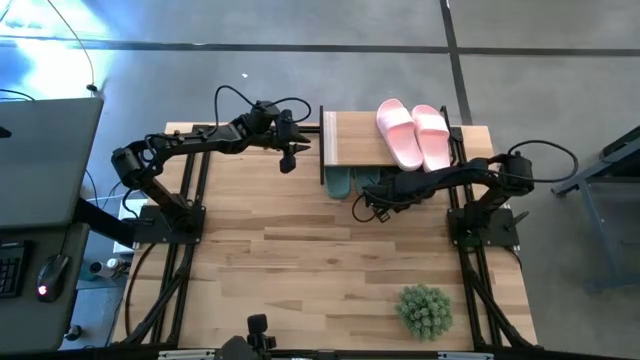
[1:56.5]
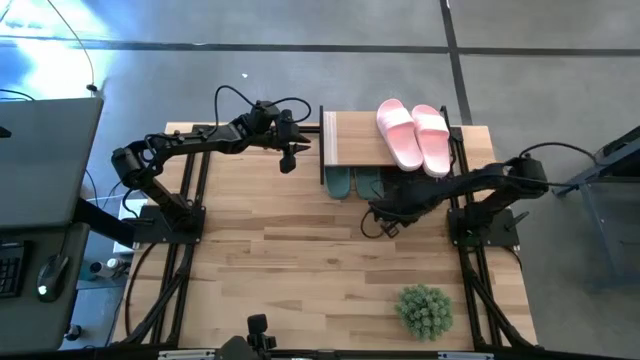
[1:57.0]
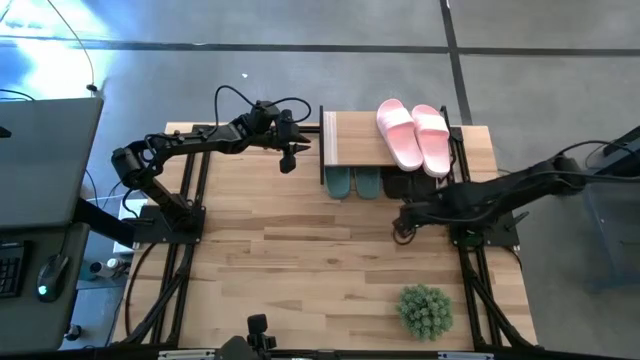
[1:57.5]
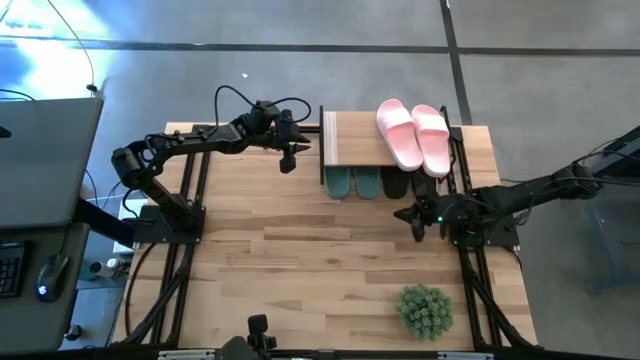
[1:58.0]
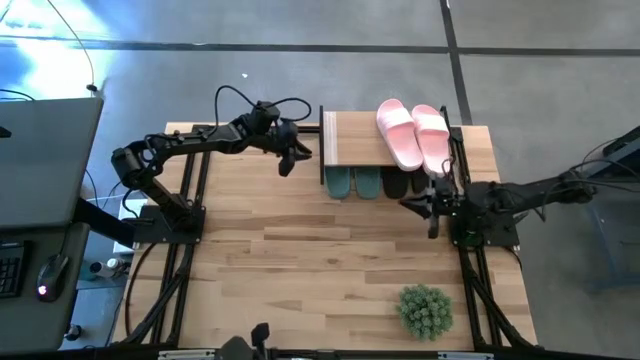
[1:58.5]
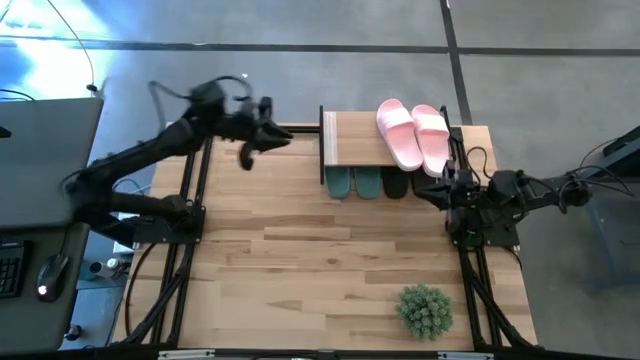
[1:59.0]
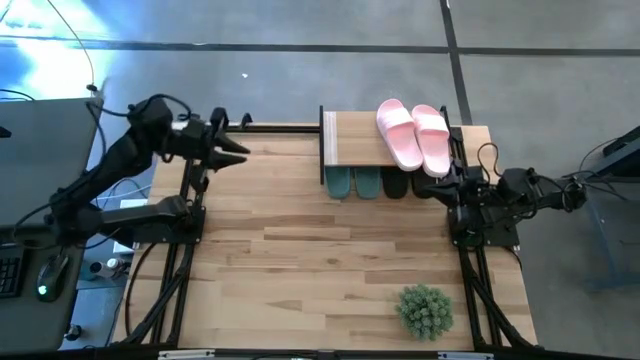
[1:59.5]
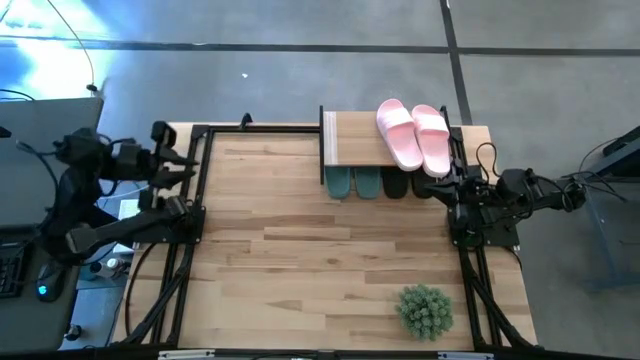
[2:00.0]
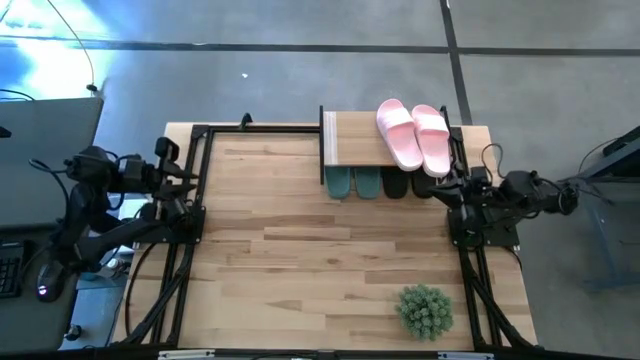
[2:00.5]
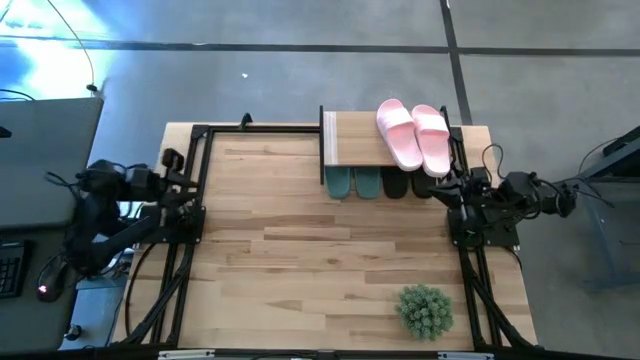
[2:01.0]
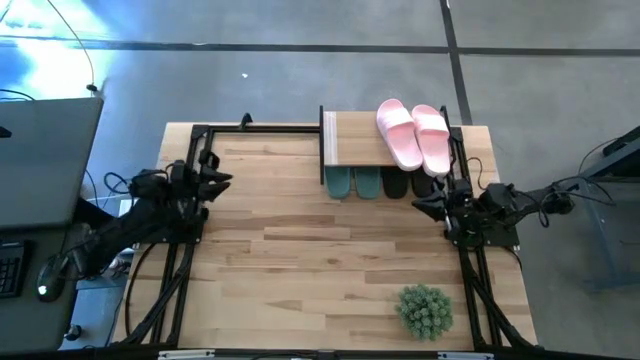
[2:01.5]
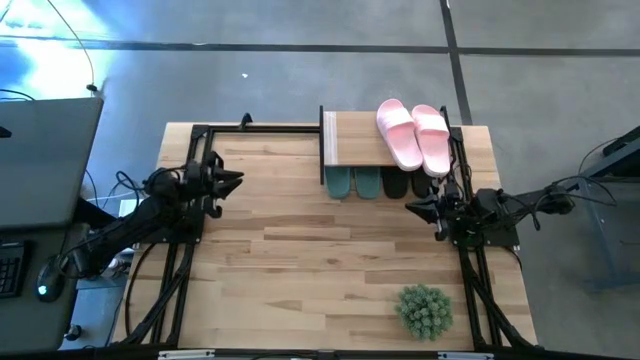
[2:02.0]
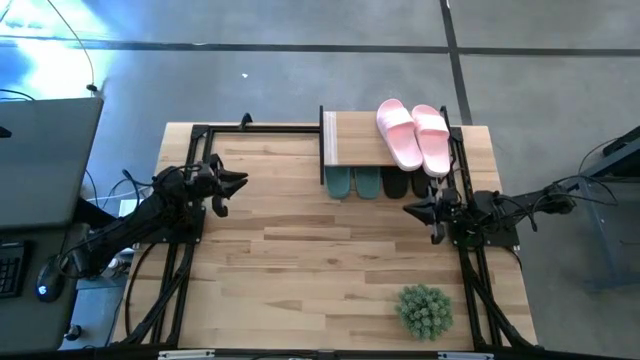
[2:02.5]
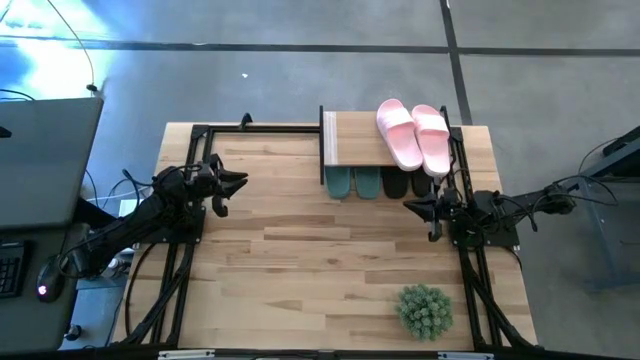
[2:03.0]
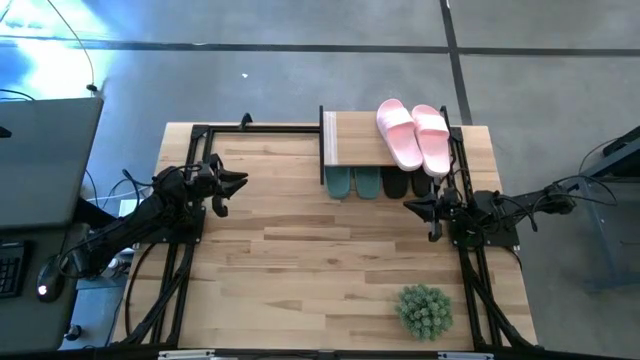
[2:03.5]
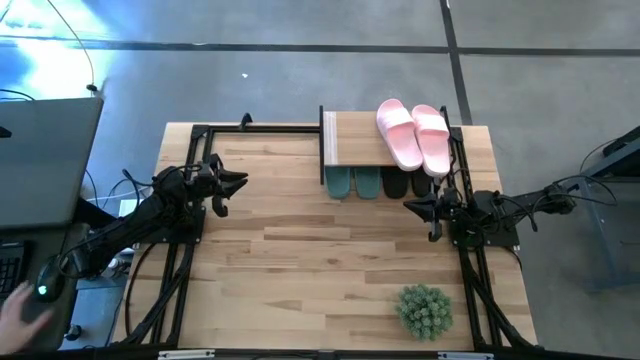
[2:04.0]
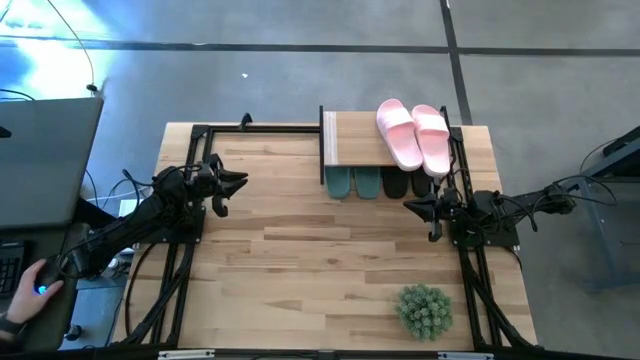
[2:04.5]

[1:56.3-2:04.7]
Task: Pick and place slides into the shelf
Return to Home Position

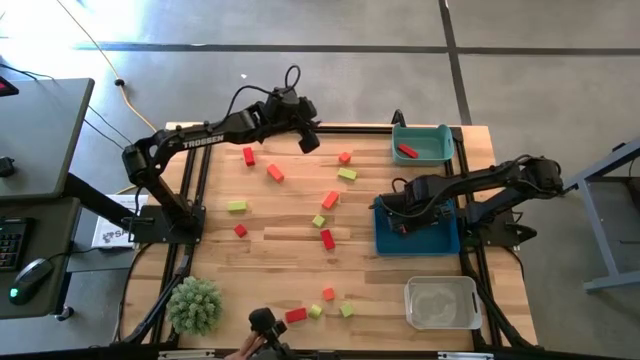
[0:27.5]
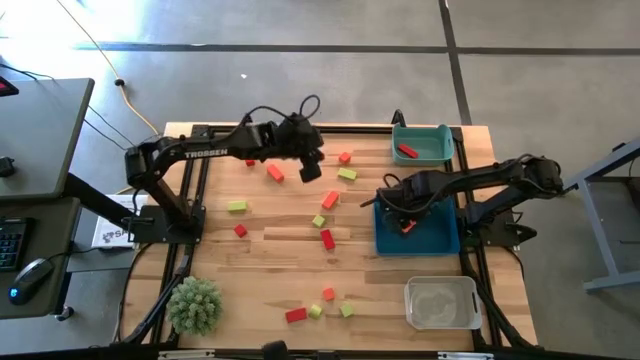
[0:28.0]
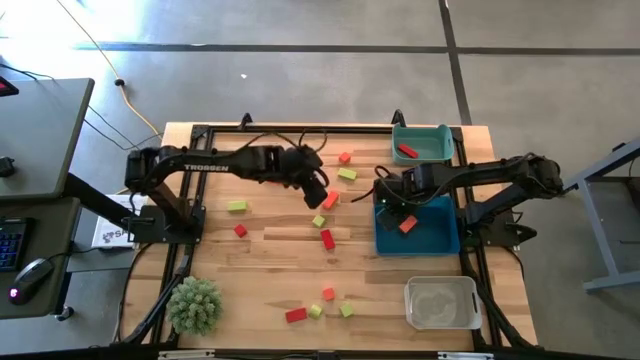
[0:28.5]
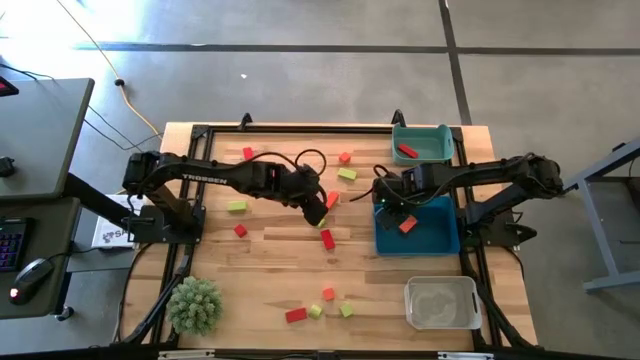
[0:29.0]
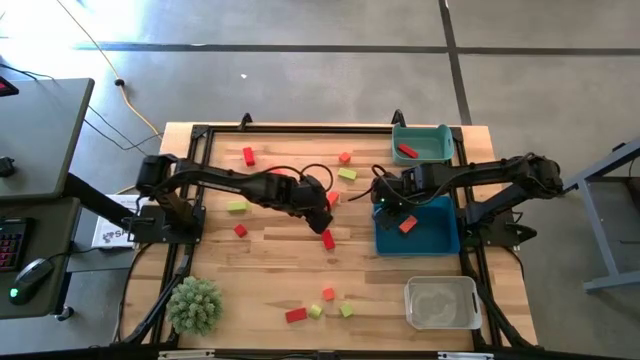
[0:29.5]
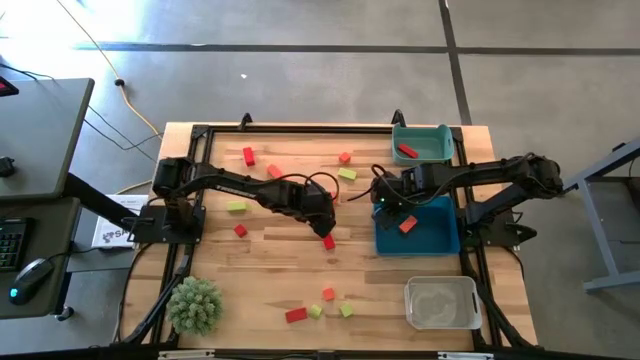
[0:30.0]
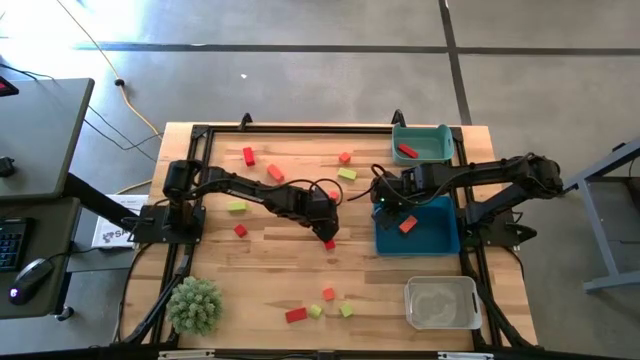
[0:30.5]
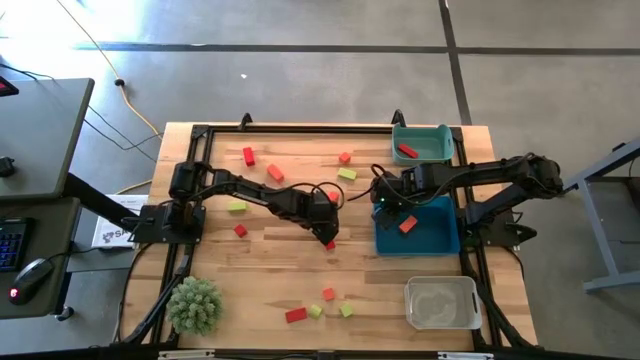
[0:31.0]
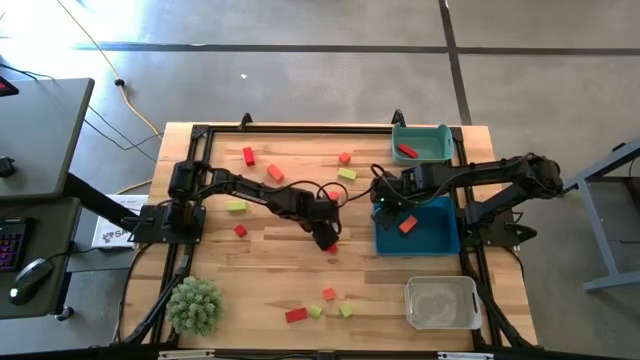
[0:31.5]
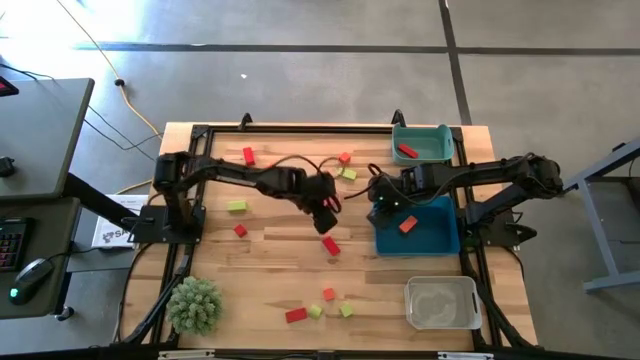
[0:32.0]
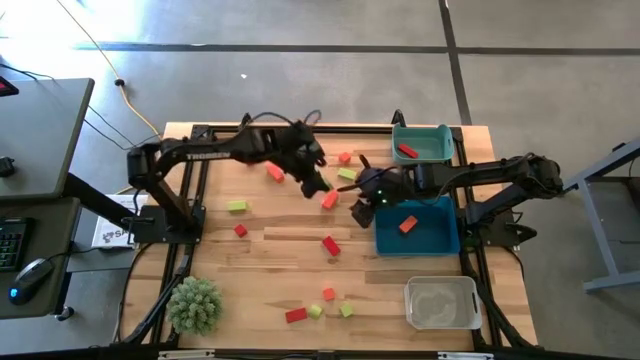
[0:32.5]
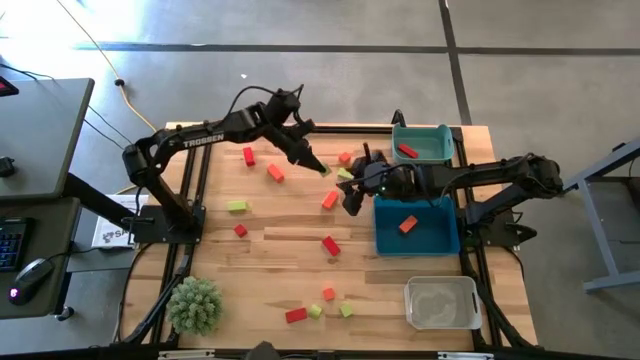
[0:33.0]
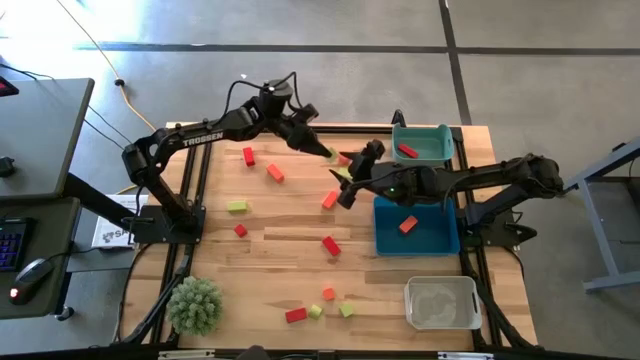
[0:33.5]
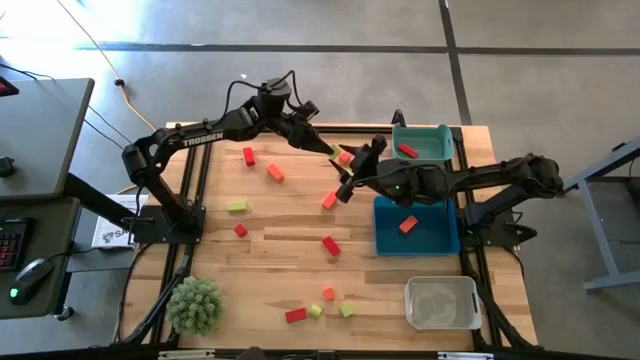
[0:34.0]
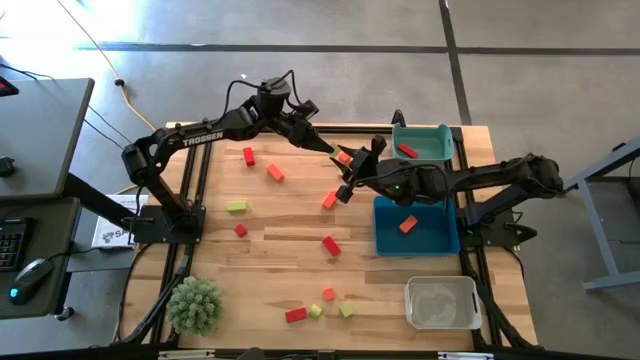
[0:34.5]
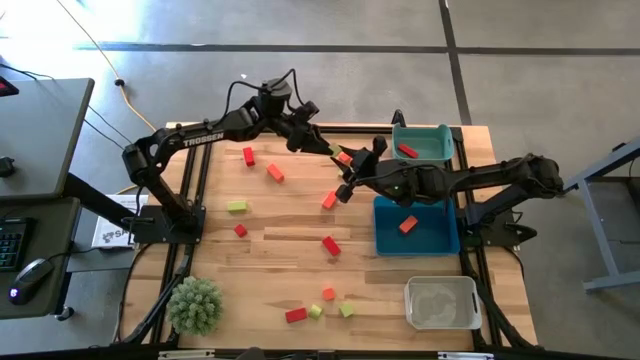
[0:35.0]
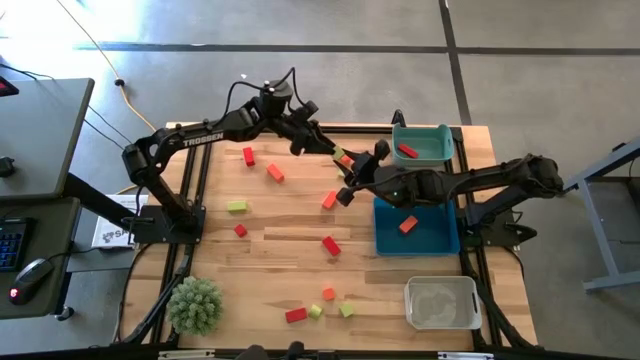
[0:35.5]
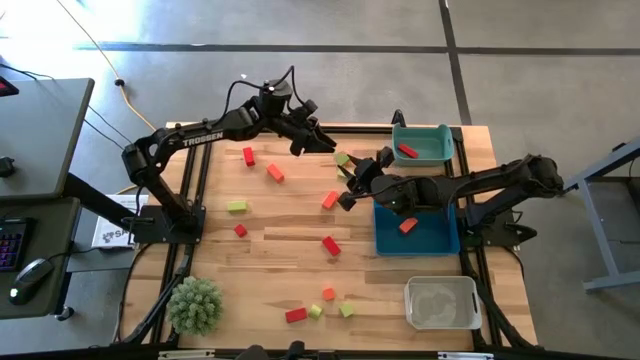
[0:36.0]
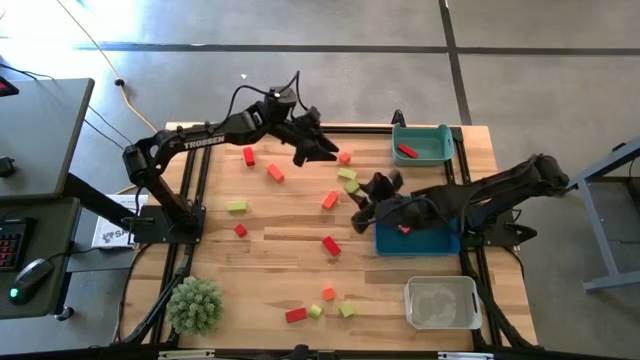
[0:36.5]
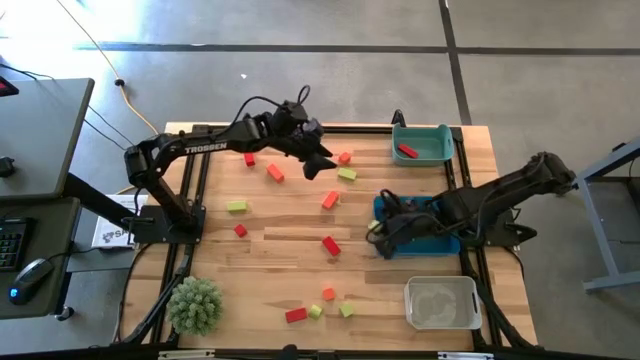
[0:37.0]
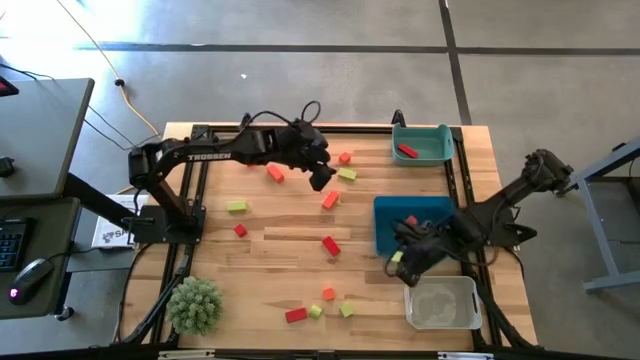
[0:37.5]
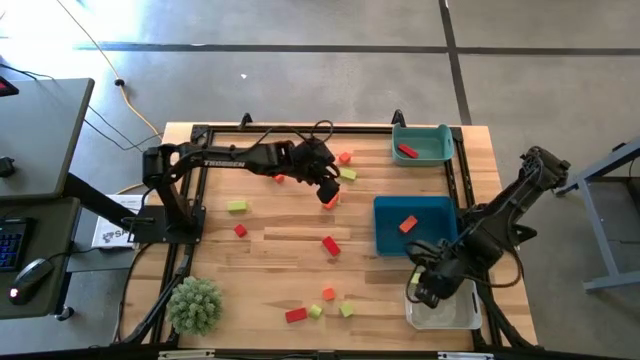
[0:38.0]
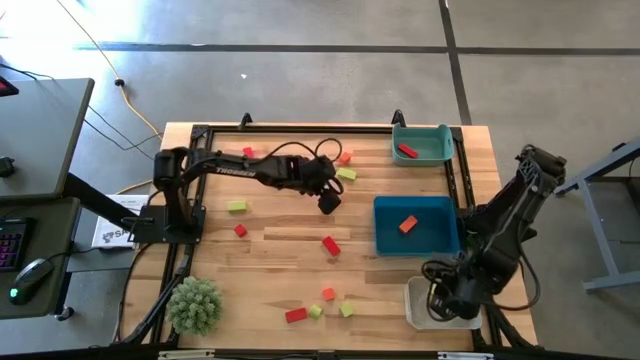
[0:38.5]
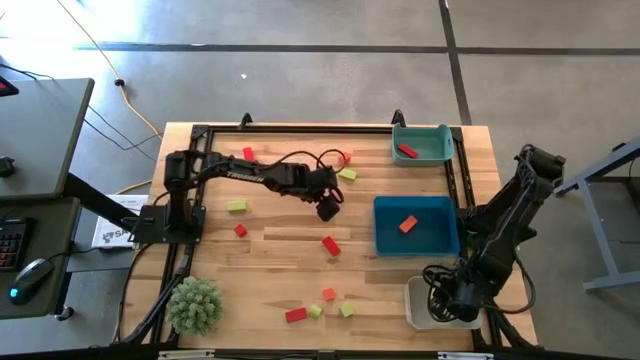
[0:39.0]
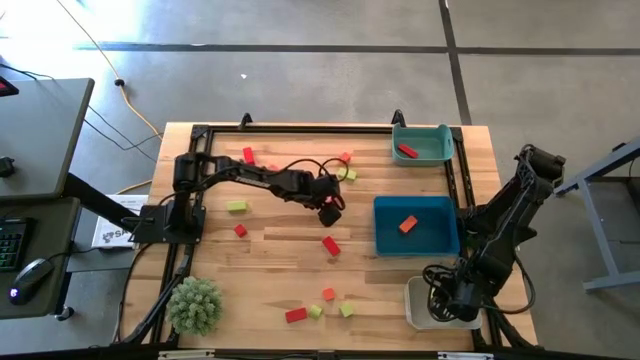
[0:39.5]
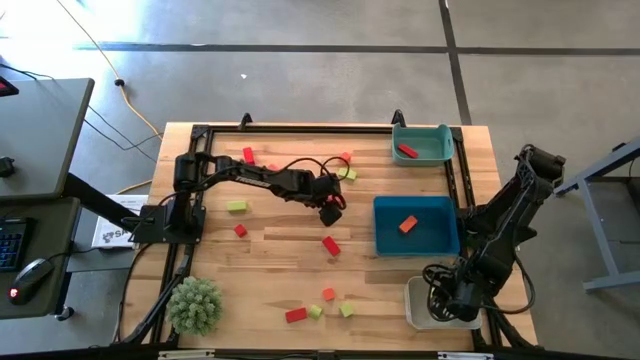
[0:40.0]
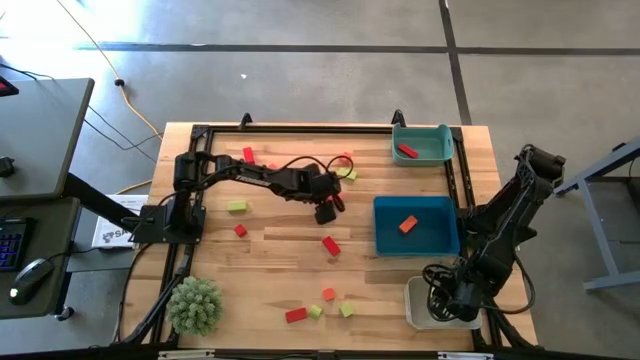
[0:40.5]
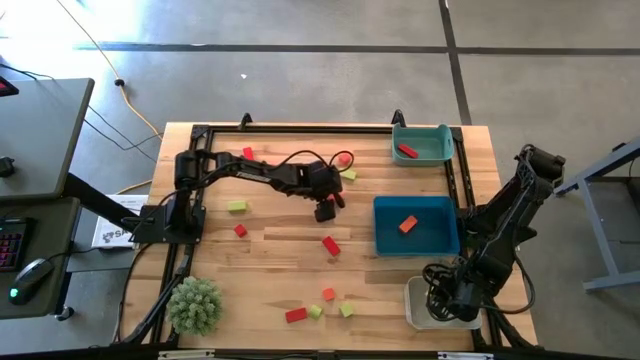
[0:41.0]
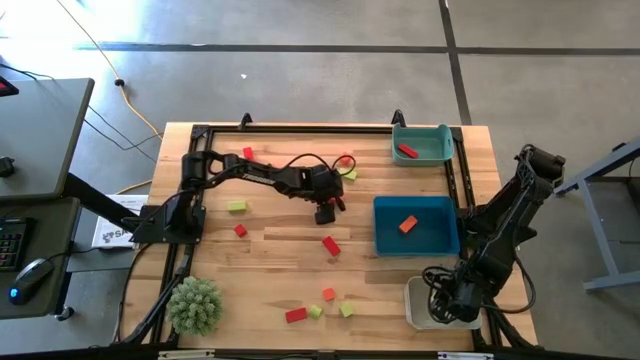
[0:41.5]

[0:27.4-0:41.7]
Task: Sort & place blocks by color
Put the green wooden block into the white bin
